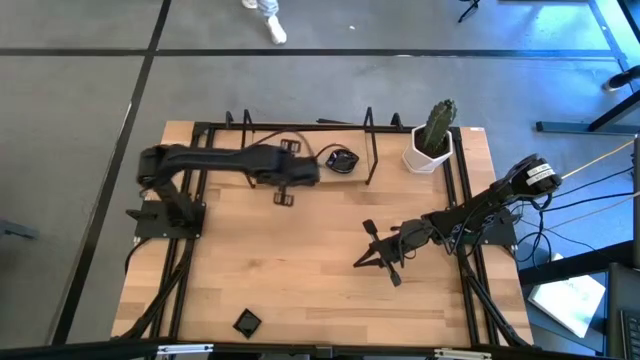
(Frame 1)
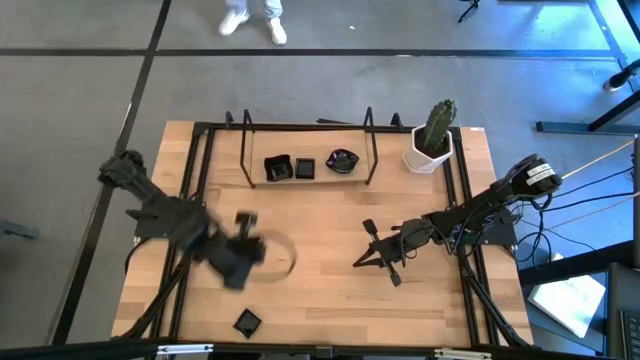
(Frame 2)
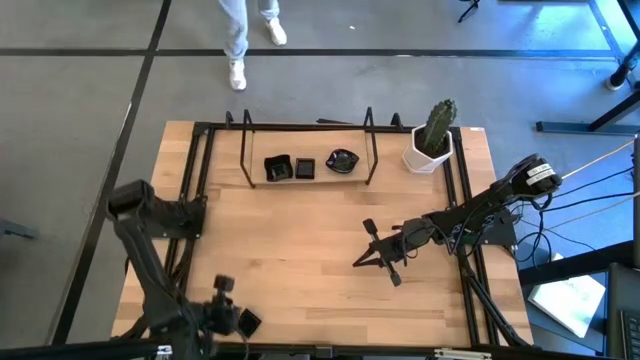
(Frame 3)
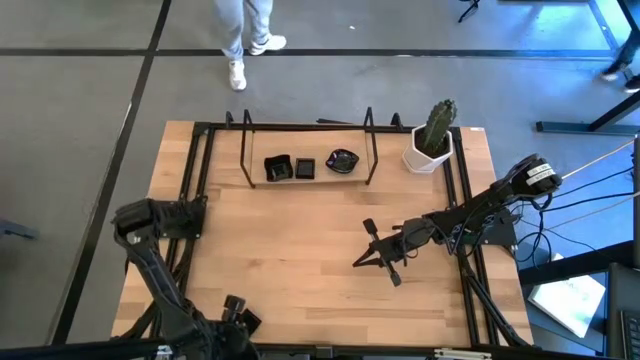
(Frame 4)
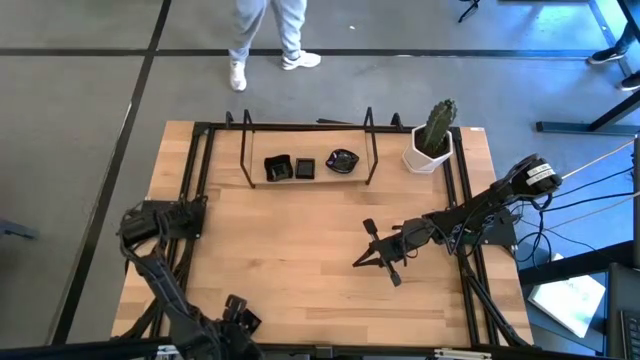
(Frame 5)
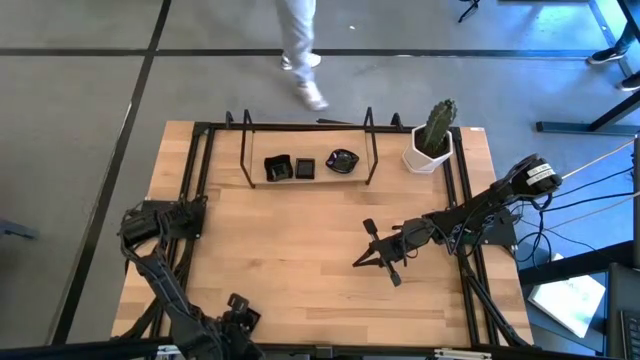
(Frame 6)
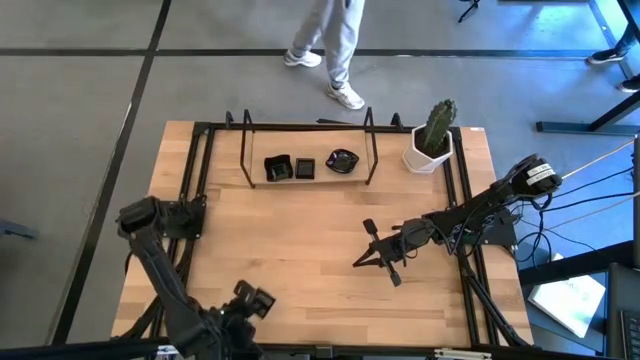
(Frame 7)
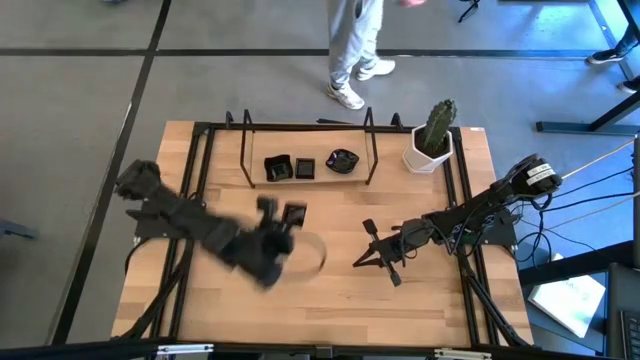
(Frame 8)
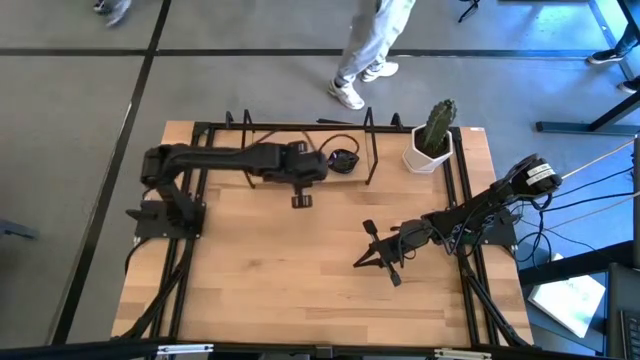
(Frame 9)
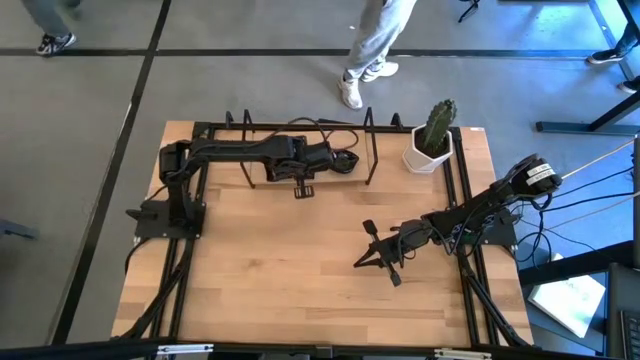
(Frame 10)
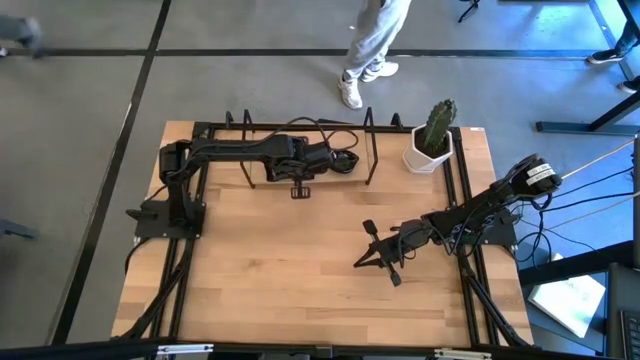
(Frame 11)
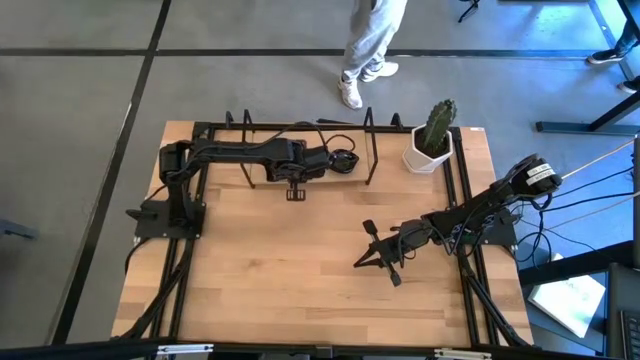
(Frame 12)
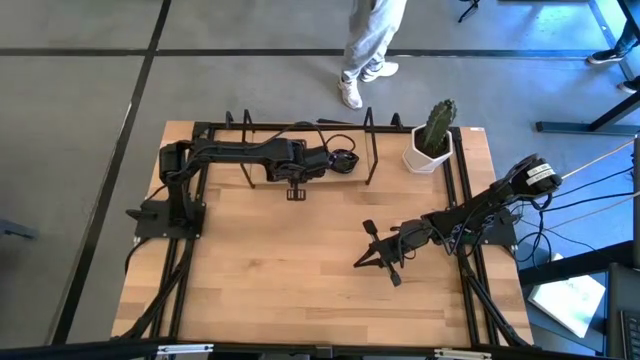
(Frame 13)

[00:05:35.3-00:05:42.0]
Task: Pick & Place Mini shaped plates
Stack the square plate on top of the square plate on the shelf

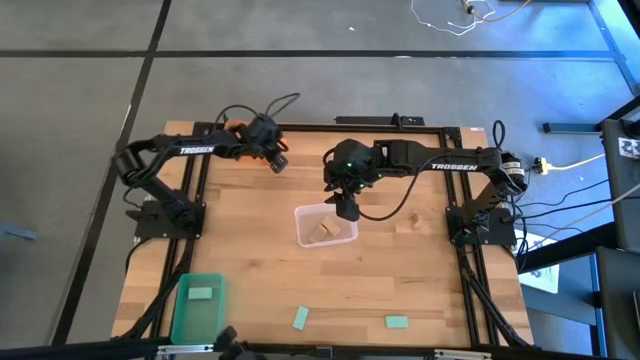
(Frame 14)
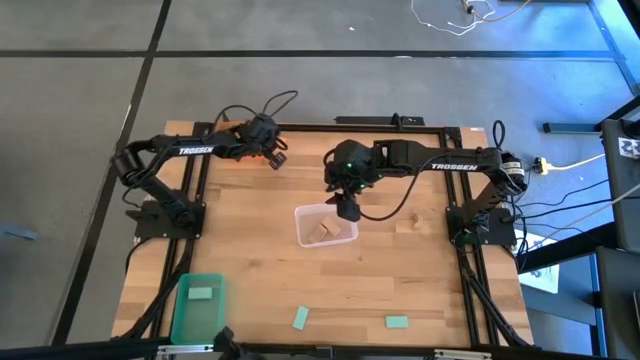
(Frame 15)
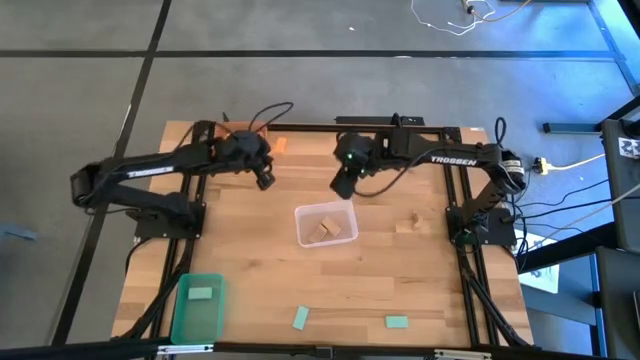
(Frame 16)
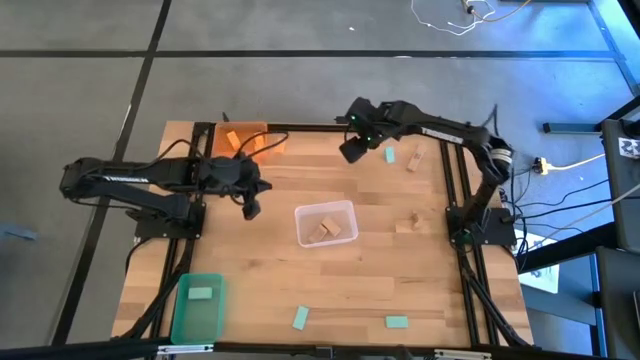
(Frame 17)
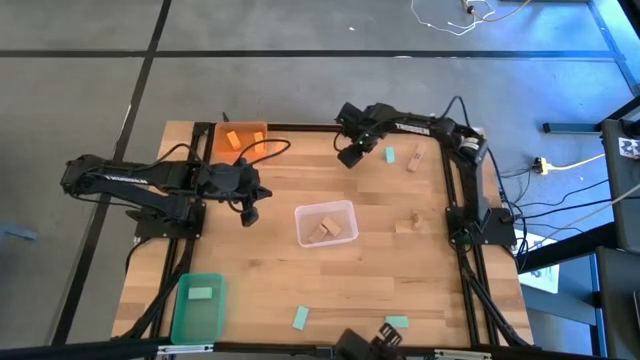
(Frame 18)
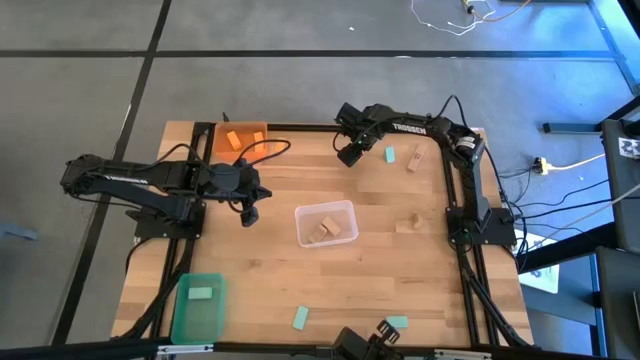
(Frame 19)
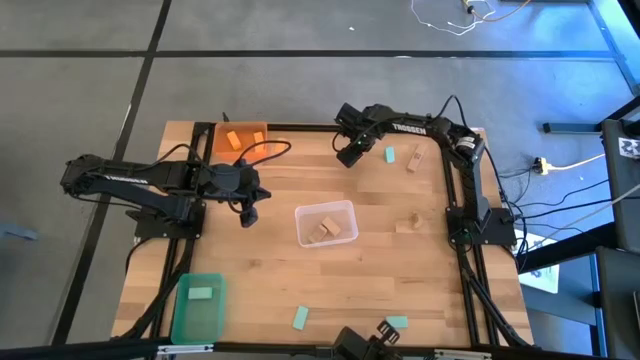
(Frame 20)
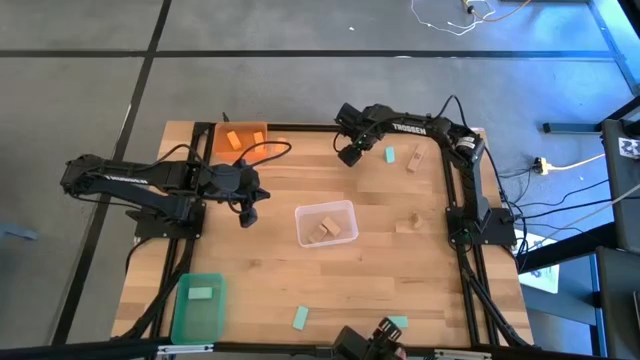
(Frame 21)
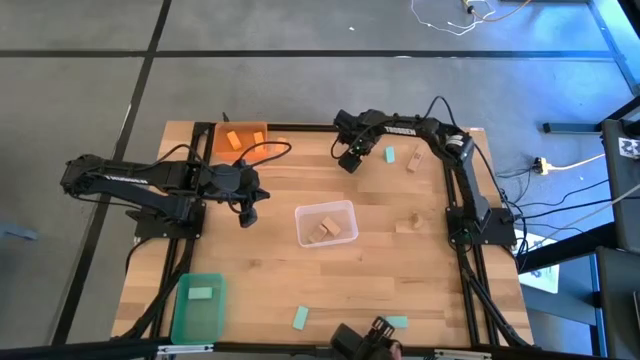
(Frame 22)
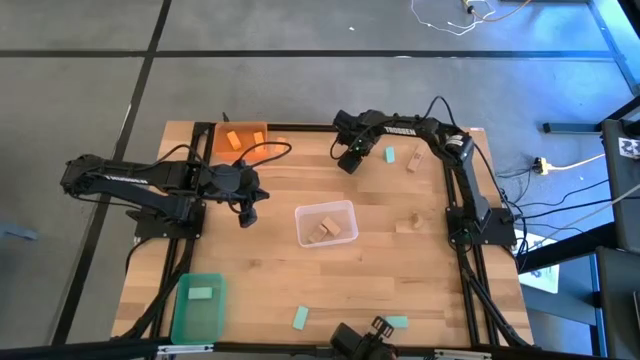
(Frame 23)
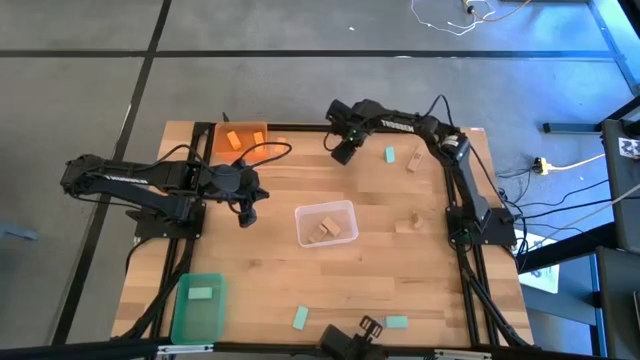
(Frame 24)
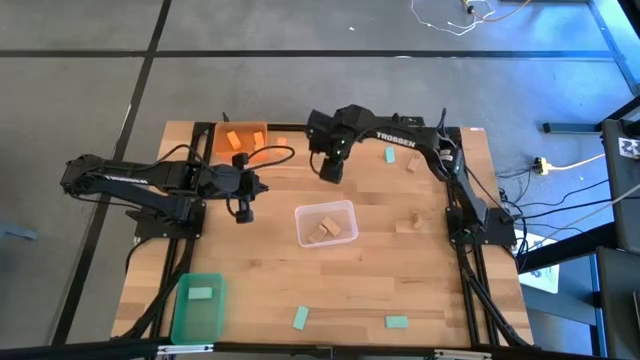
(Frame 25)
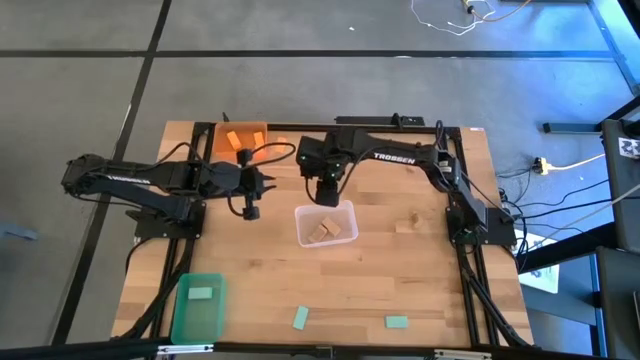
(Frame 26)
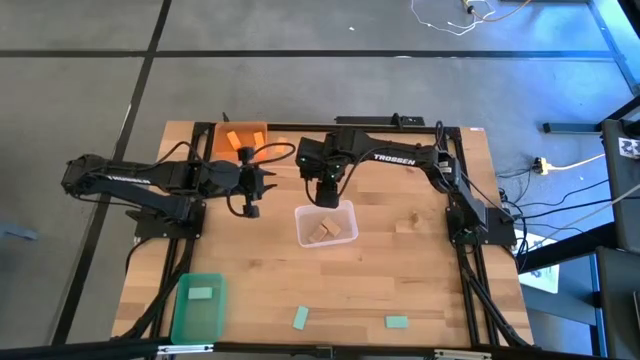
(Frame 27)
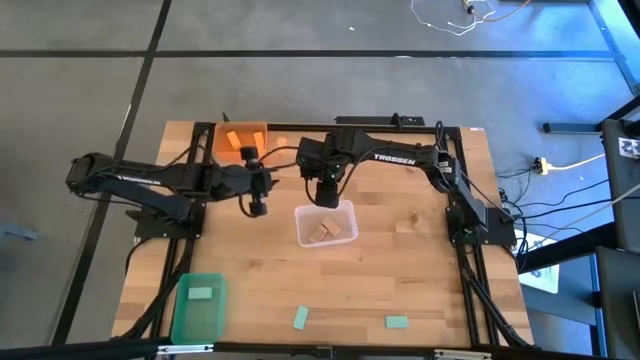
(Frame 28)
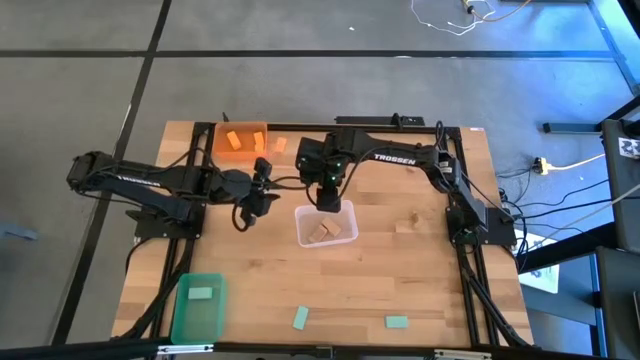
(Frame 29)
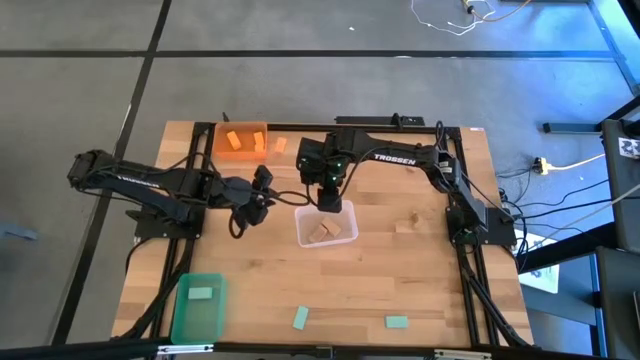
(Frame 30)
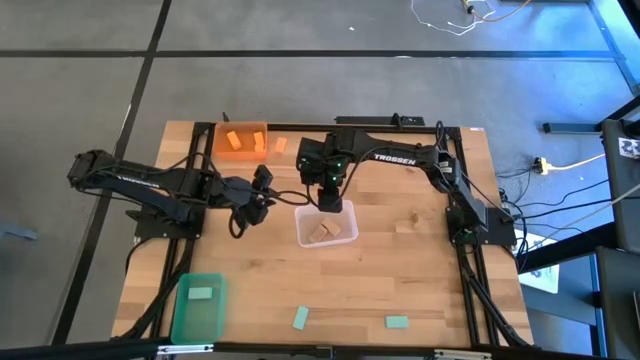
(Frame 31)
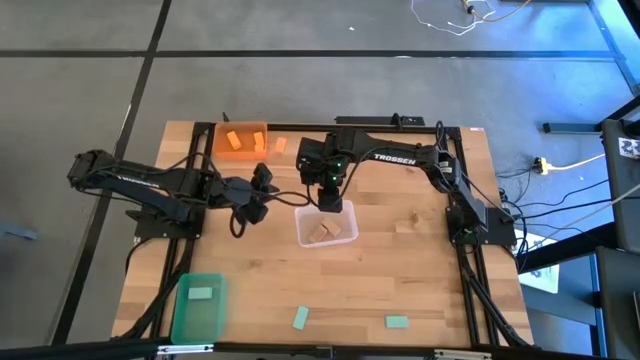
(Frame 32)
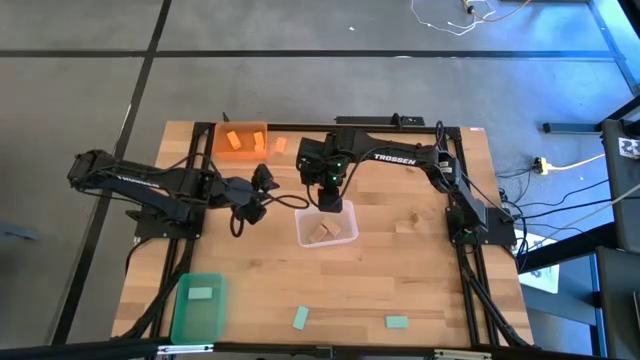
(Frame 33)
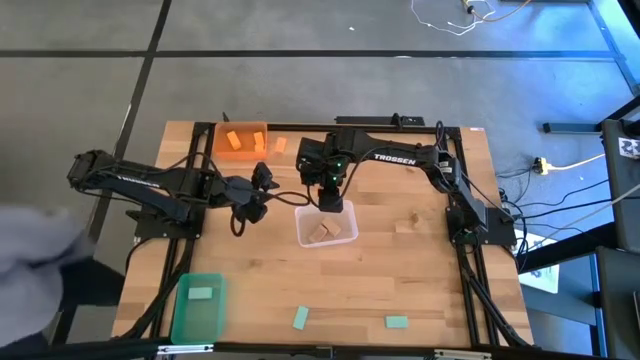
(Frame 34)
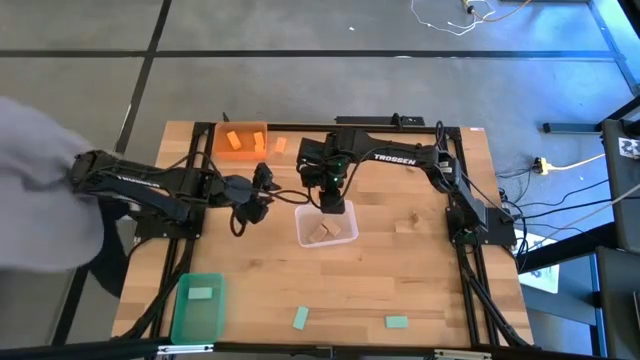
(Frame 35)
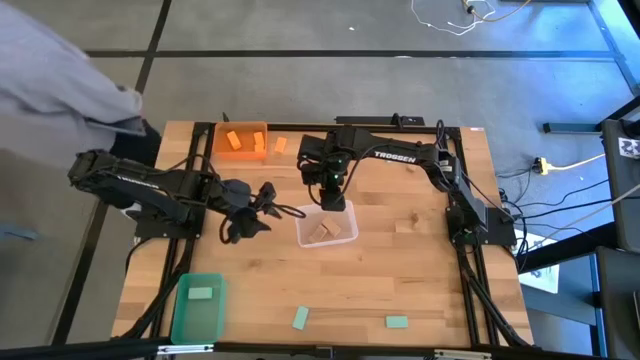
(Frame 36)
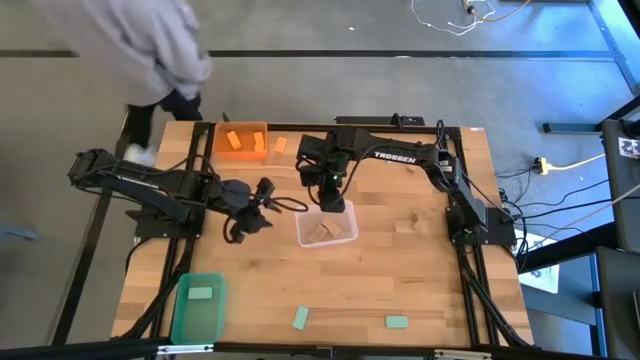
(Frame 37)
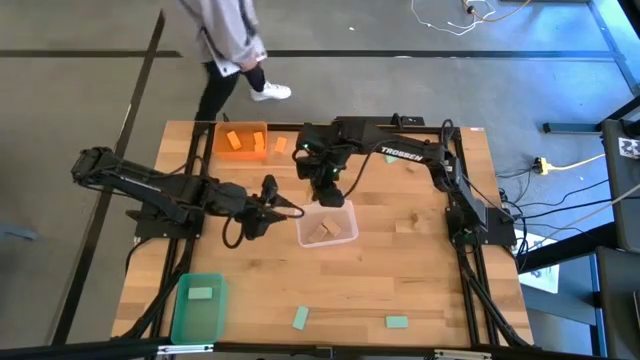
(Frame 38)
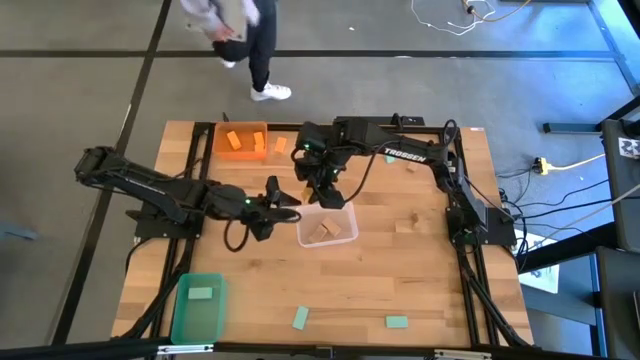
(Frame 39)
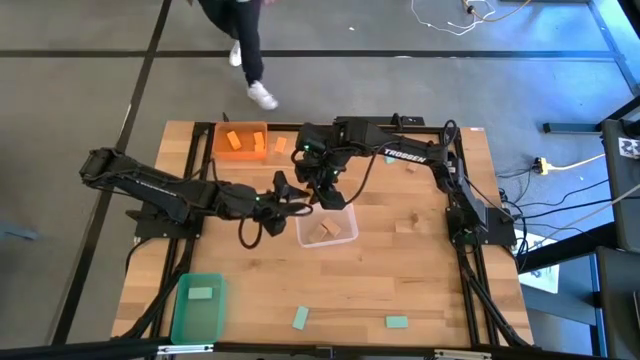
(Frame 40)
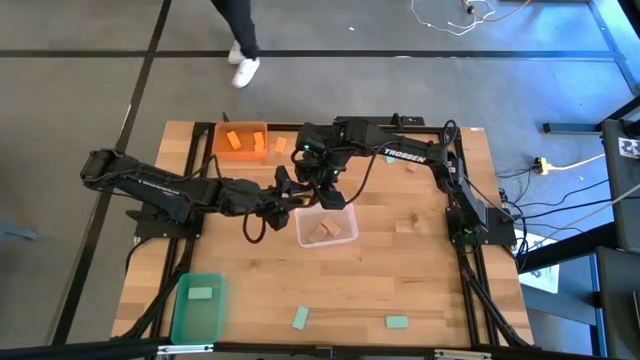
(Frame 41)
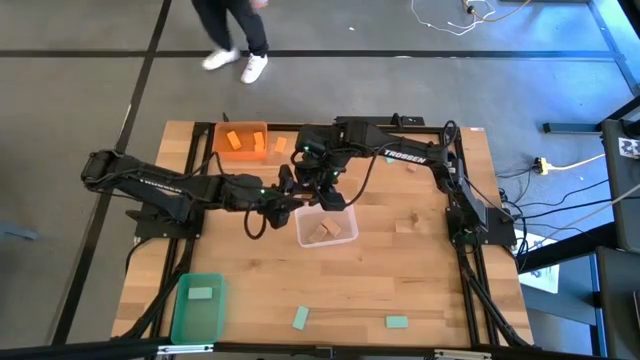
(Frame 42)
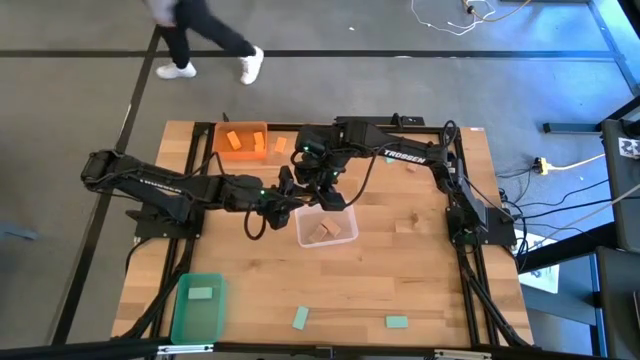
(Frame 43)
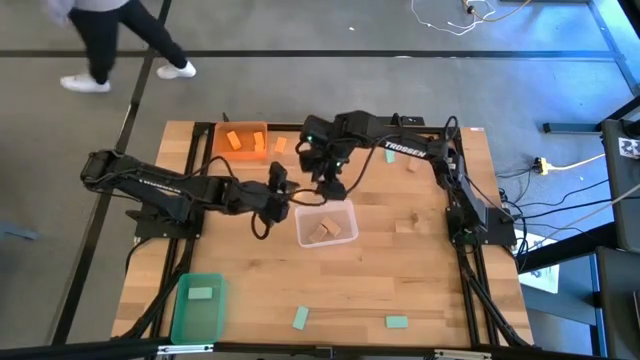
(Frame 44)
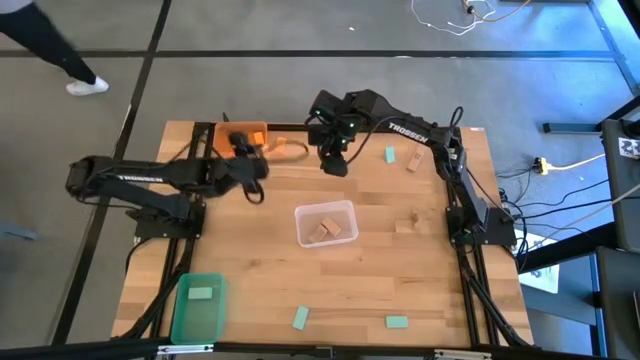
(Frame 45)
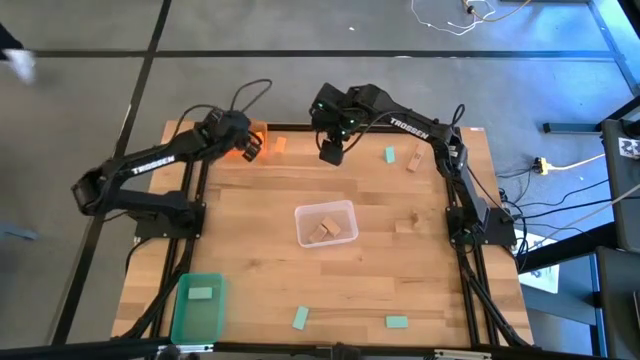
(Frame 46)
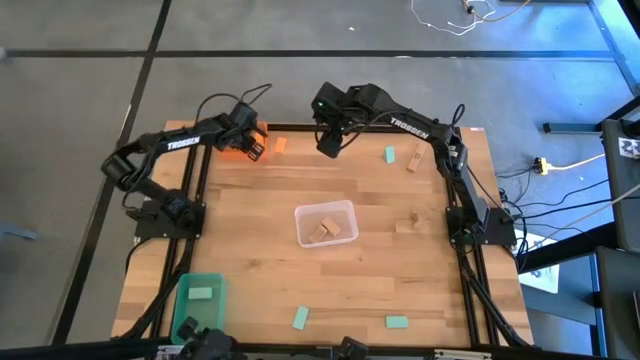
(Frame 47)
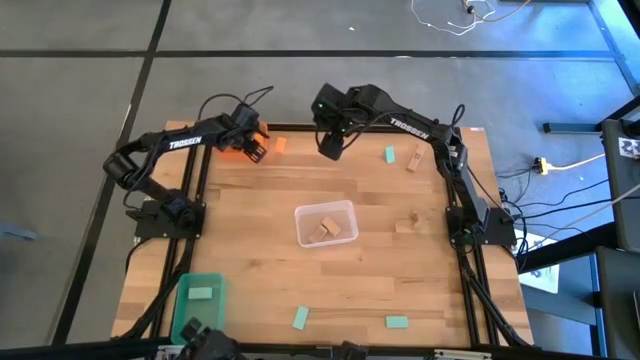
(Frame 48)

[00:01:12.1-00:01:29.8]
Task: Sort & place blocks by color
Put the yellow block into the orange bin
